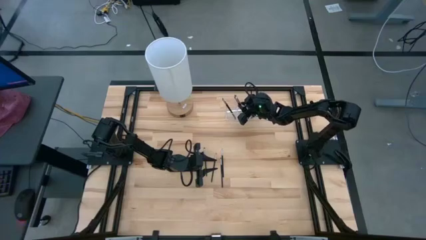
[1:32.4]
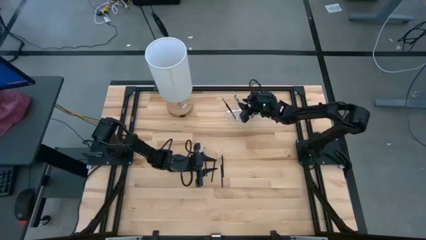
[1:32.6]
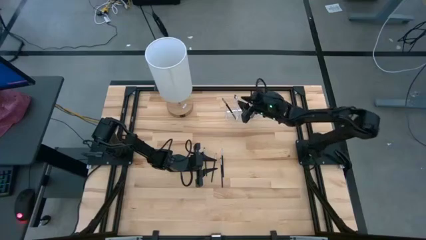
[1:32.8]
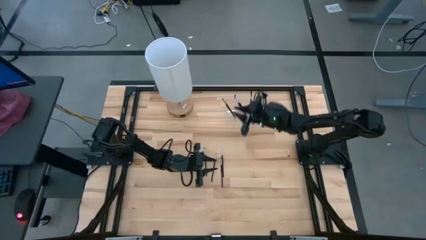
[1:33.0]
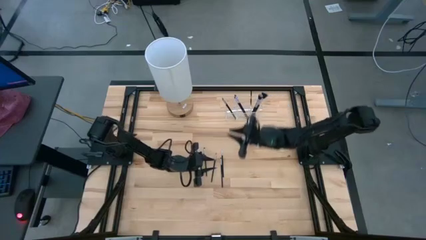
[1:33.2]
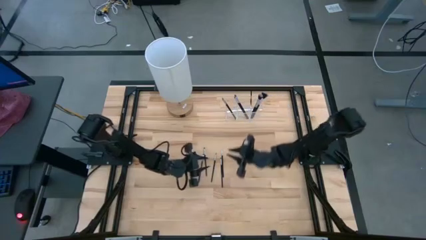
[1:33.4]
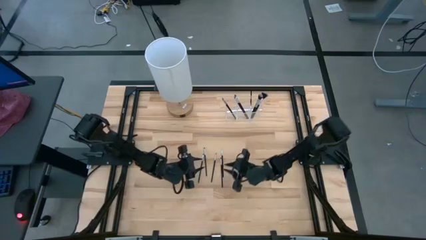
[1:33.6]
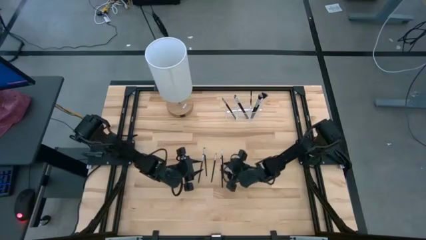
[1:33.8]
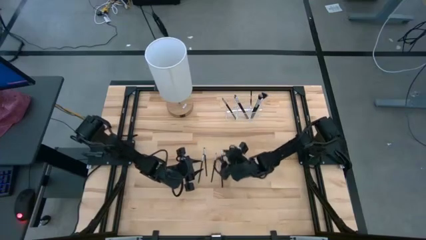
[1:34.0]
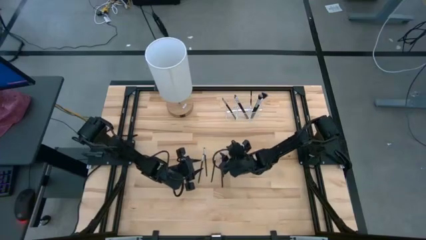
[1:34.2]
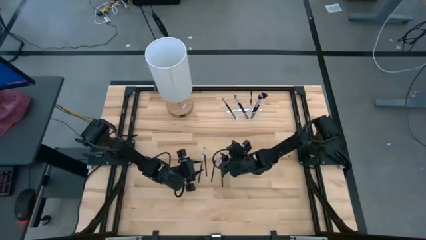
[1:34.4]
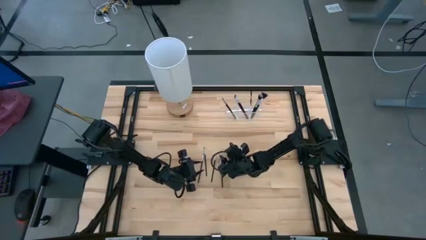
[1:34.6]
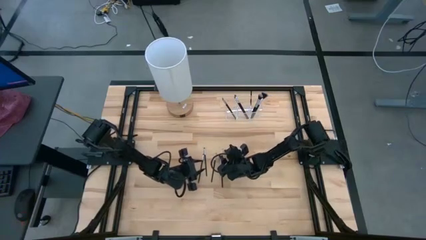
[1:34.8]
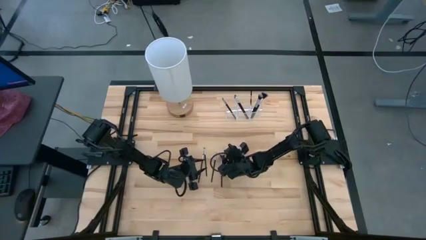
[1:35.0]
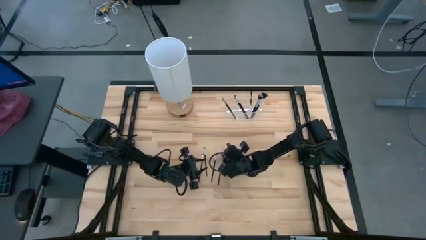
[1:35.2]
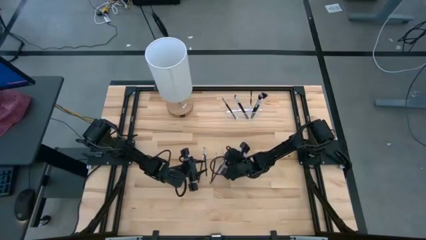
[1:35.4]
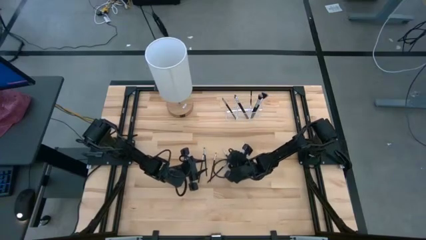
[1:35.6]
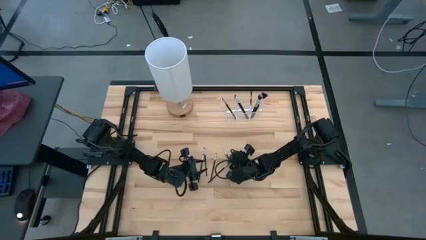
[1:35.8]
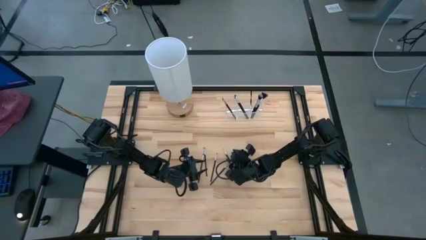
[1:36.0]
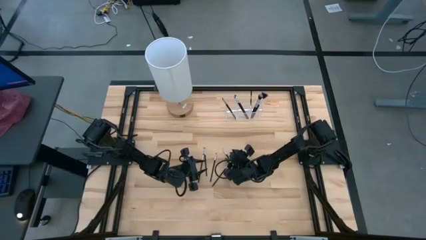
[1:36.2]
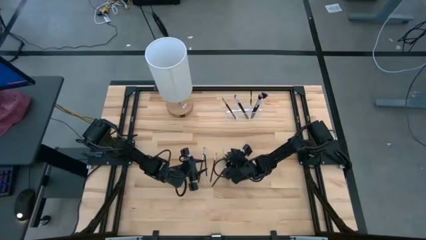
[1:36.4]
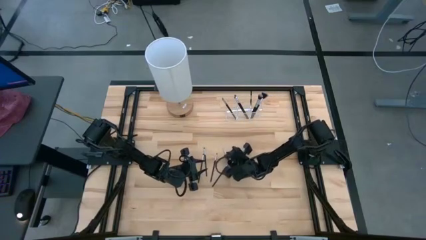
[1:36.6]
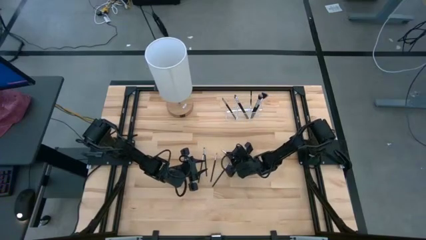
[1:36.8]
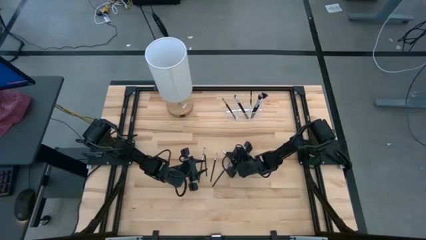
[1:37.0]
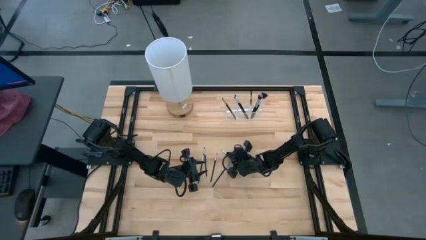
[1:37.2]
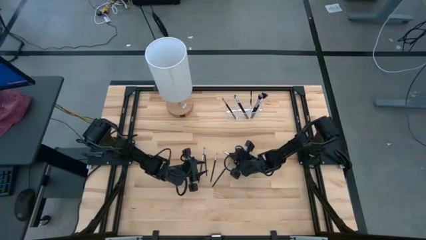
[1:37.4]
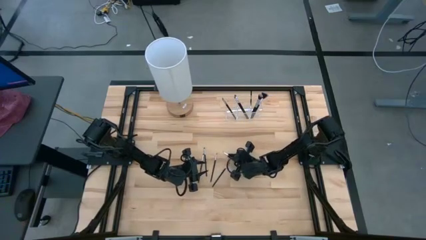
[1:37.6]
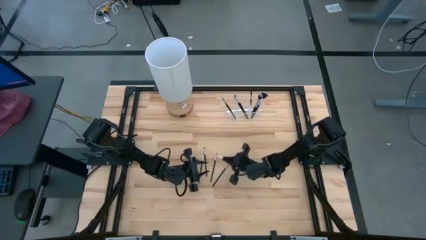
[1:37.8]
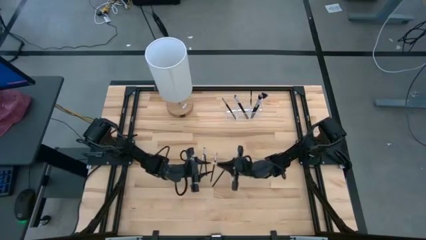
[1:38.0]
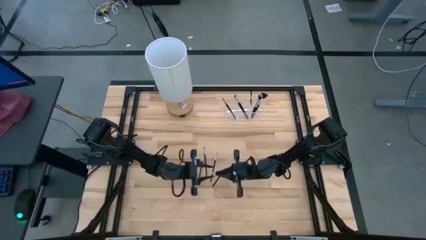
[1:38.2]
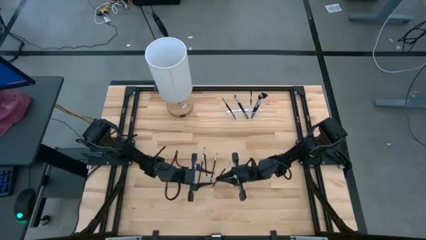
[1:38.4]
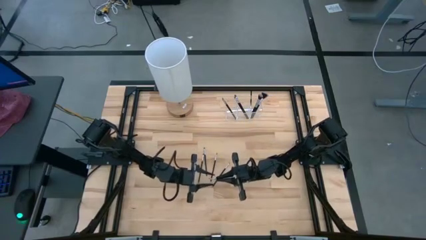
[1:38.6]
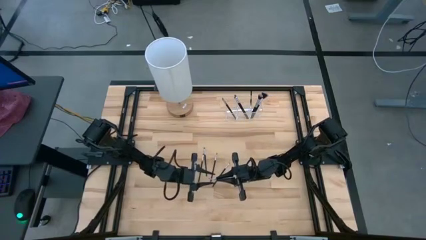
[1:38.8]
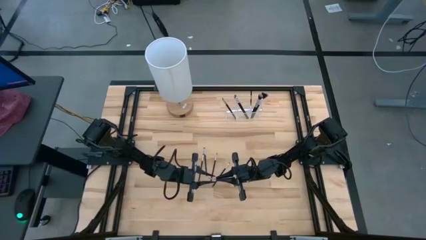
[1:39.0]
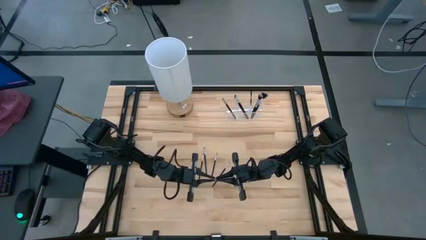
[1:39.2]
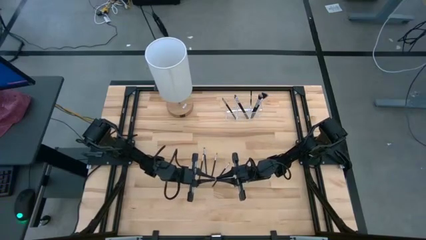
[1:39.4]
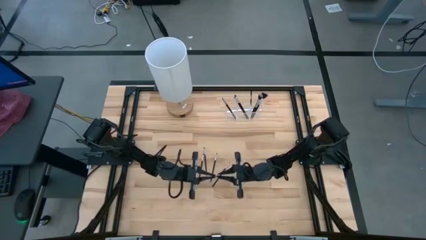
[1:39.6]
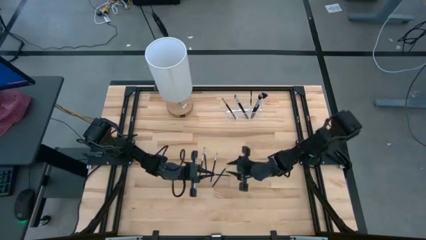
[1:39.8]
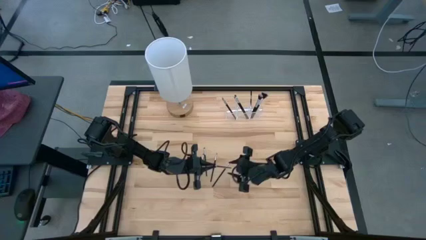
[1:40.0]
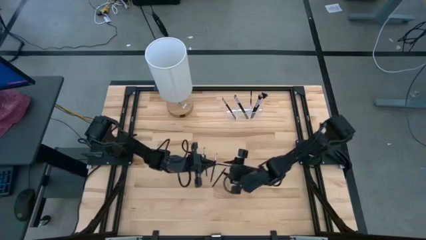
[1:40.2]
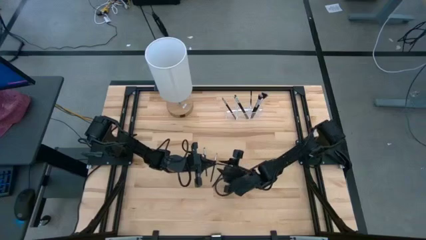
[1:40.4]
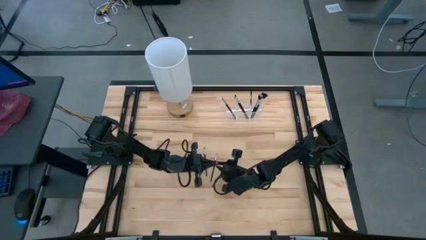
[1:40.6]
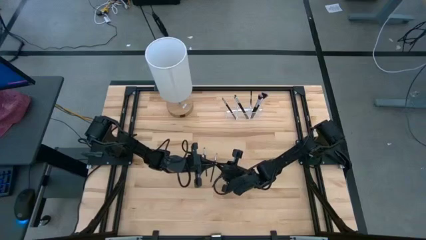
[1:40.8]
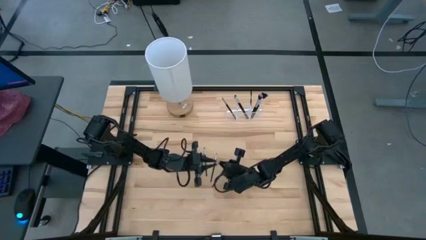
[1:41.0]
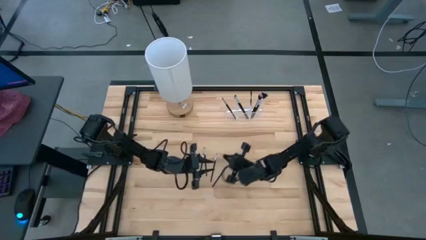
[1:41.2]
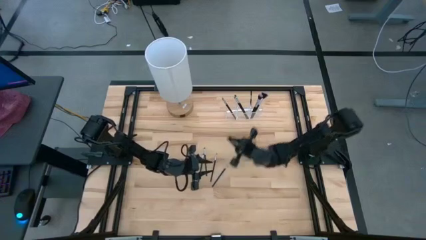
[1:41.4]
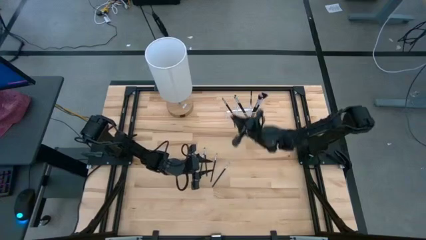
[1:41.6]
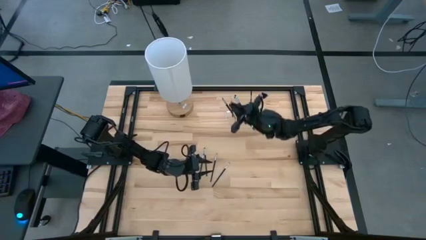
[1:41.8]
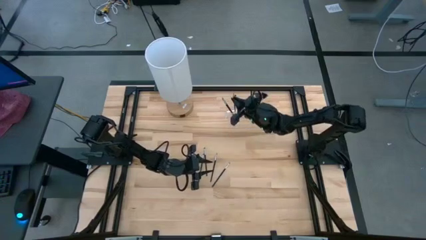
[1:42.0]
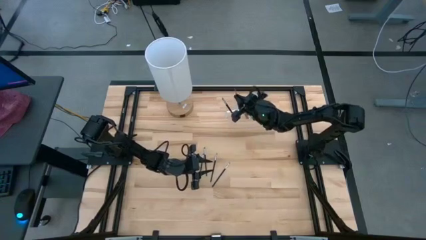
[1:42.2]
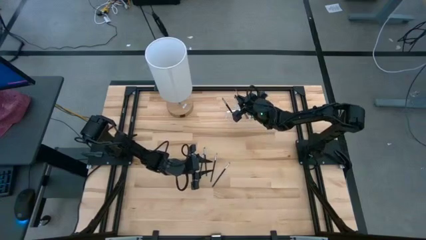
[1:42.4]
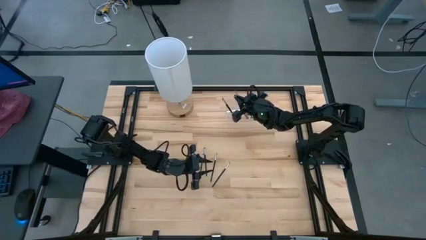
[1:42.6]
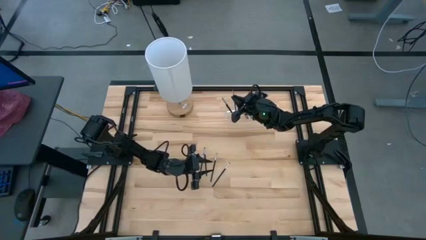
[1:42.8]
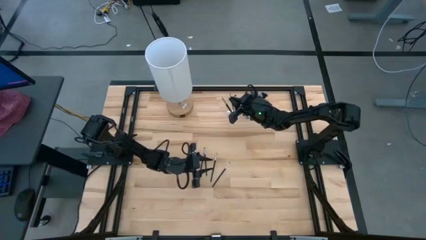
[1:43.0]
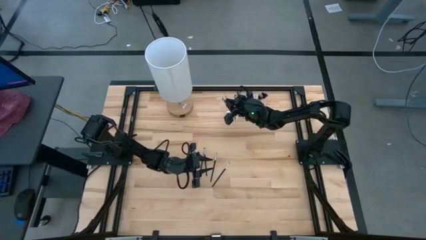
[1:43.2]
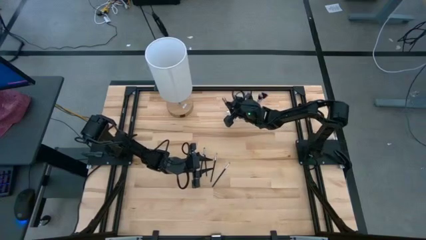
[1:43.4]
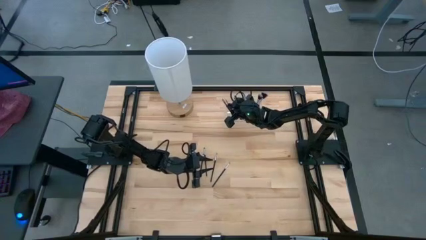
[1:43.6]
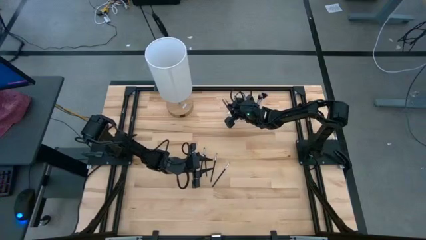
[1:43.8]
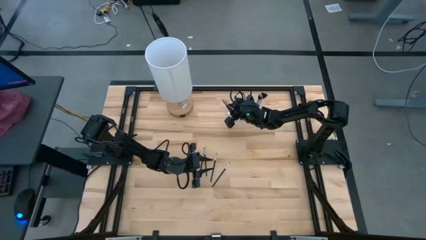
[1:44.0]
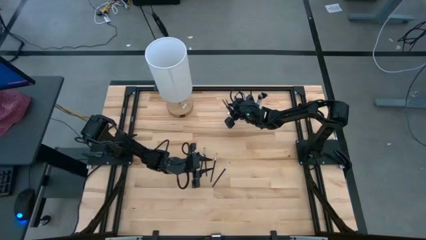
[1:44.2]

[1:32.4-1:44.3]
Task: Sort items
Put the eyeshadow brush into the transparent organizer

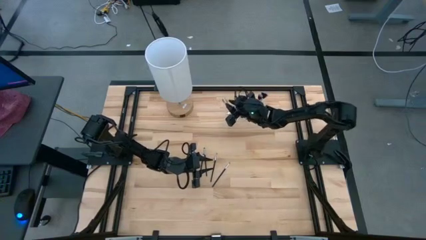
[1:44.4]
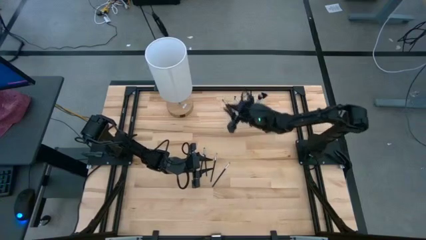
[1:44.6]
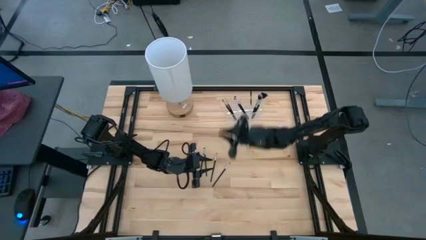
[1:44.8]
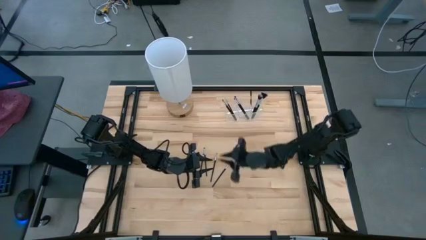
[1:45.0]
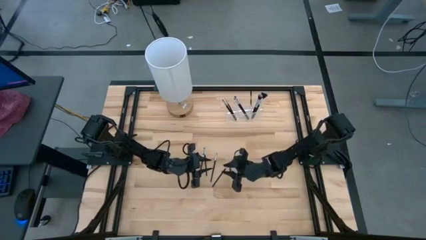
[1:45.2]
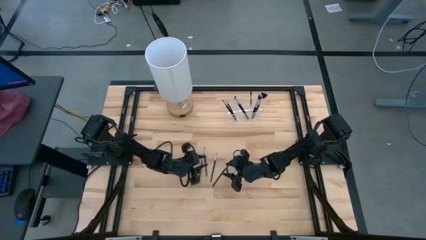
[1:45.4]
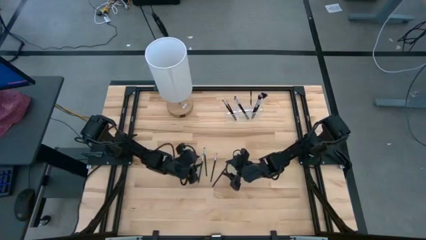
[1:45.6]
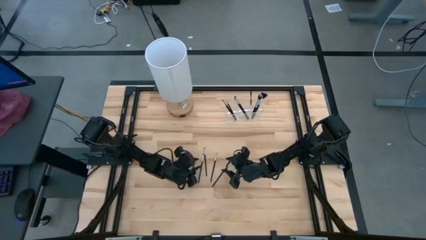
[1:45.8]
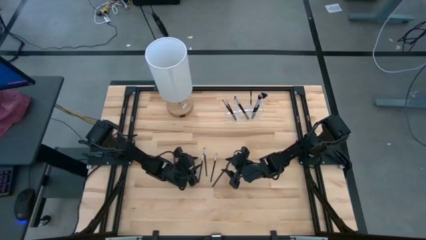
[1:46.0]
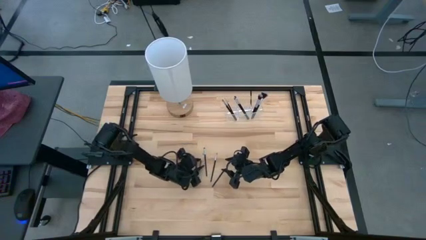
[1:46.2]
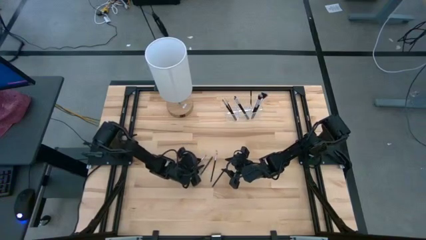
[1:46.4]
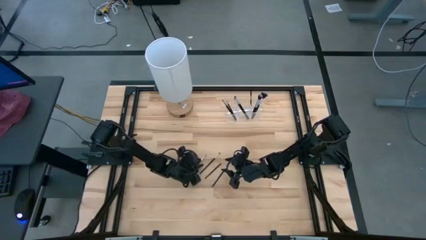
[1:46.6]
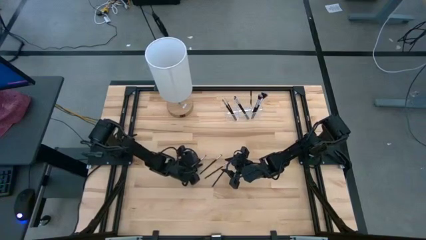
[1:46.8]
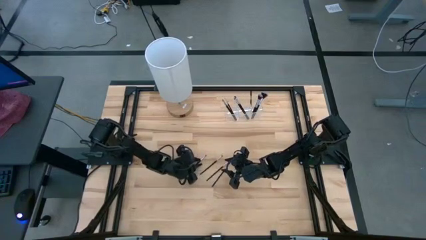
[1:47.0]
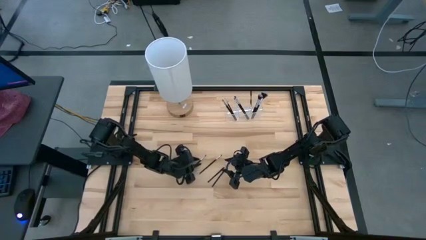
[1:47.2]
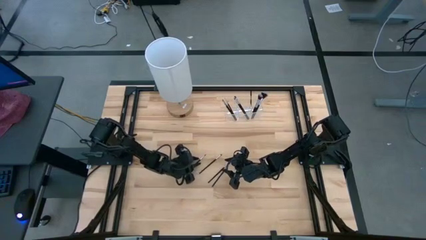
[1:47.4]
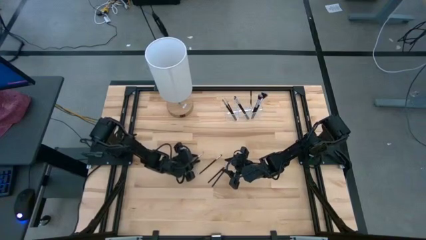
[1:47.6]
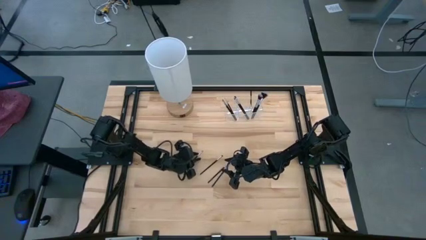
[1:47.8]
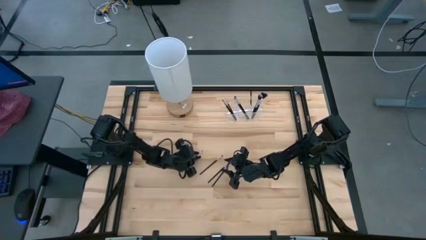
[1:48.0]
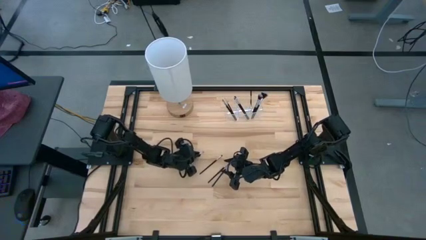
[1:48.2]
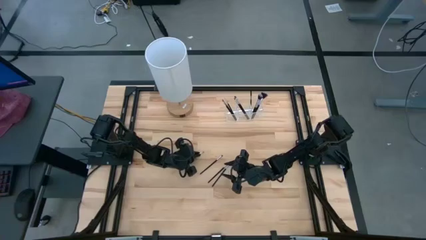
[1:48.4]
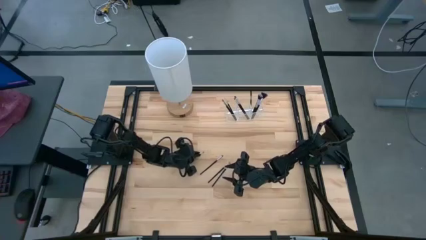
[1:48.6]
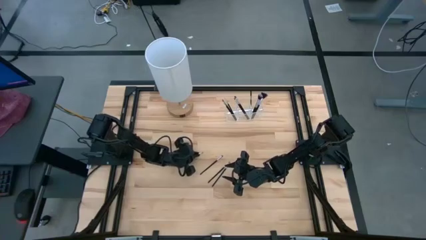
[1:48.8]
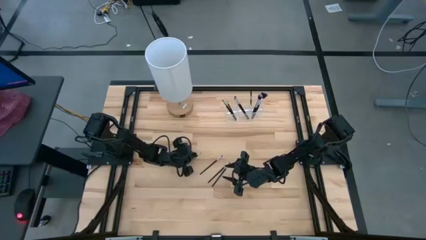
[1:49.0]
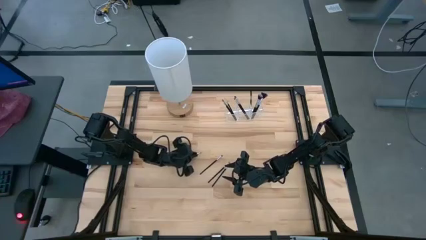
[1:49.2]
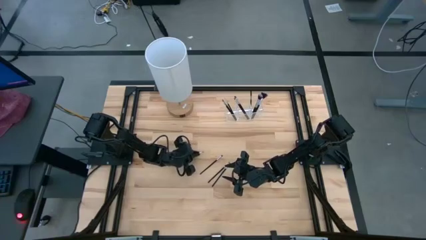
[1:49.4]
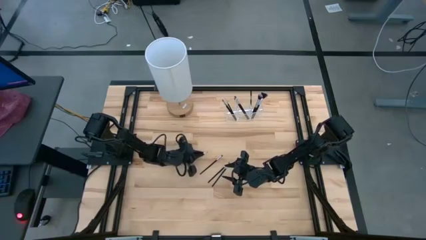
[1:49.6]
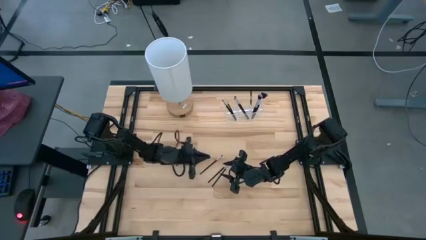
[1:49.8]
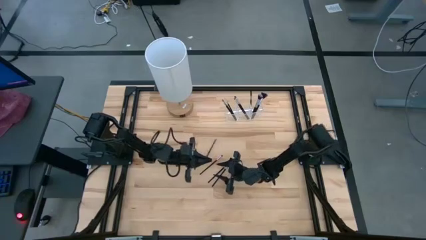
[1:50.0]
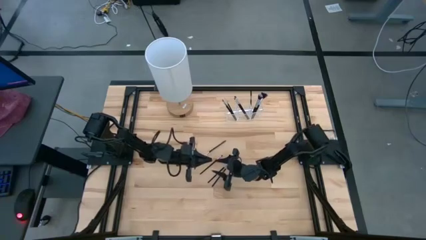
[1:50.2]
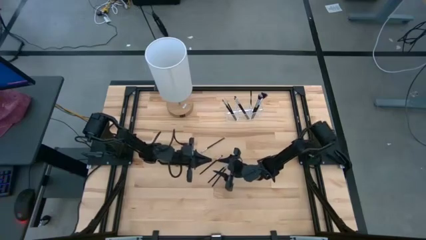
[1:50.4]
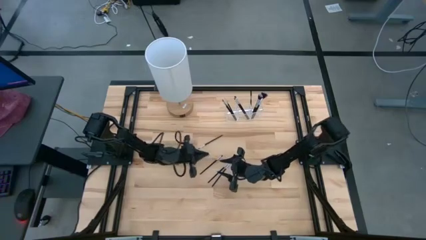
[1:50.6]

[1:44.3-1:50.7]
Put the eyeshadow brush into the transparent organizer
